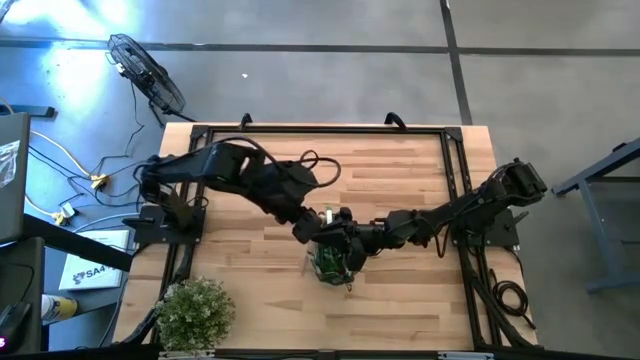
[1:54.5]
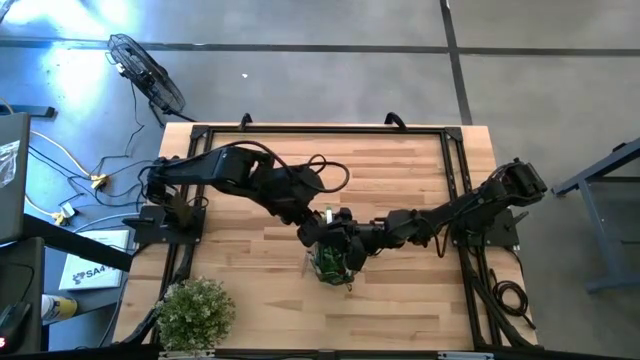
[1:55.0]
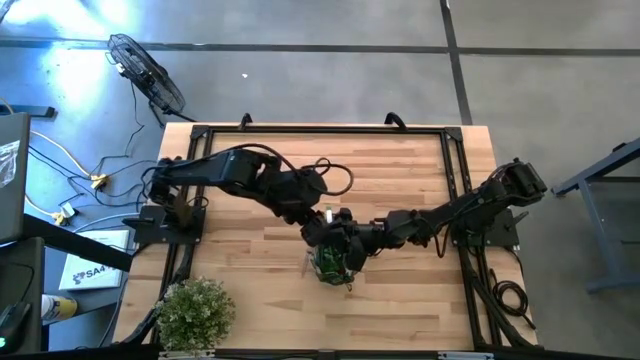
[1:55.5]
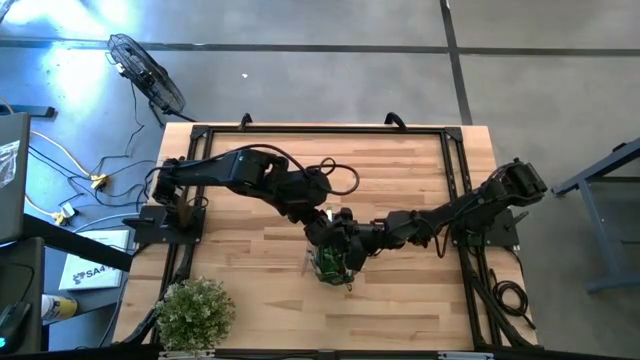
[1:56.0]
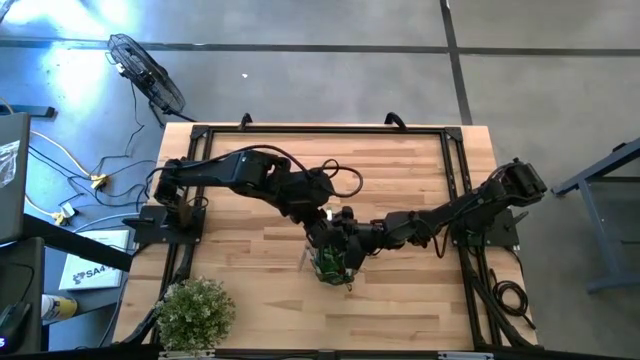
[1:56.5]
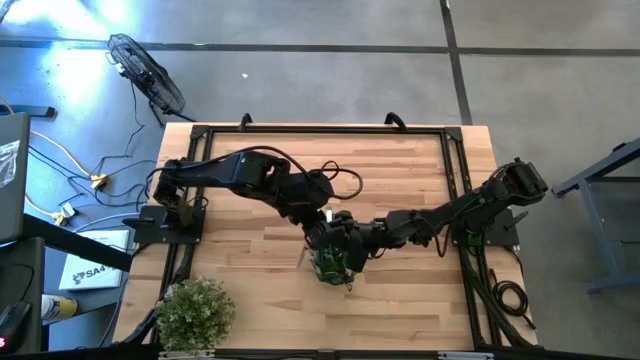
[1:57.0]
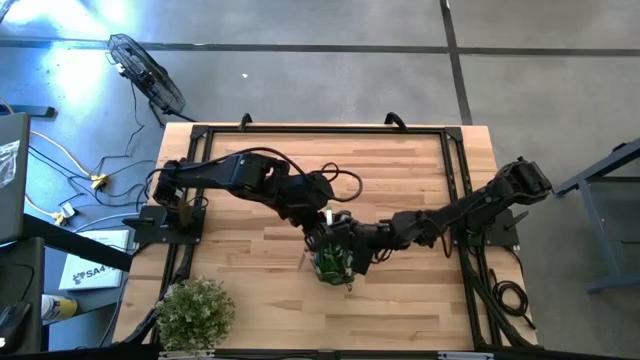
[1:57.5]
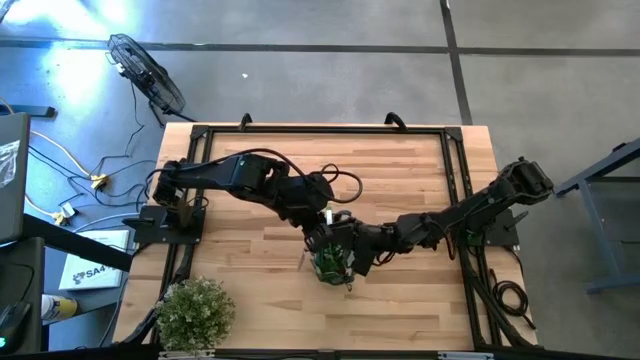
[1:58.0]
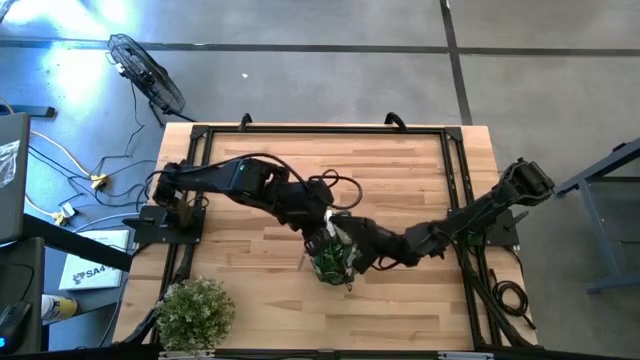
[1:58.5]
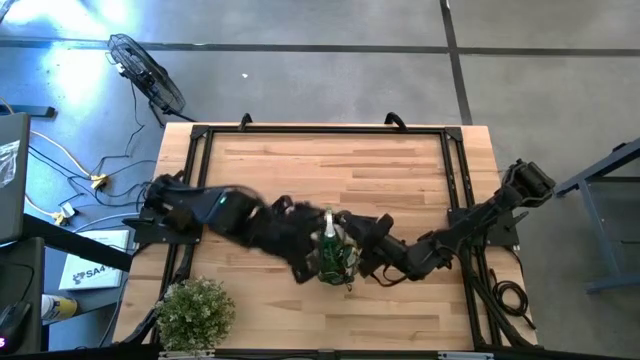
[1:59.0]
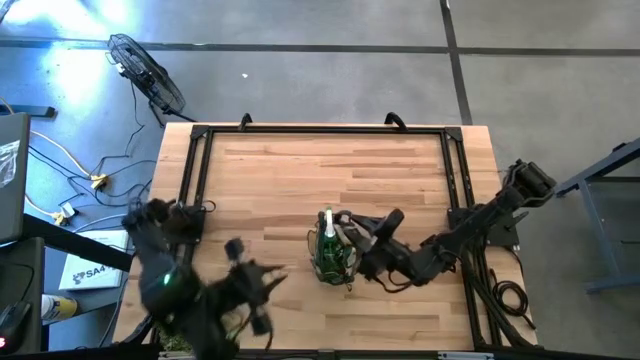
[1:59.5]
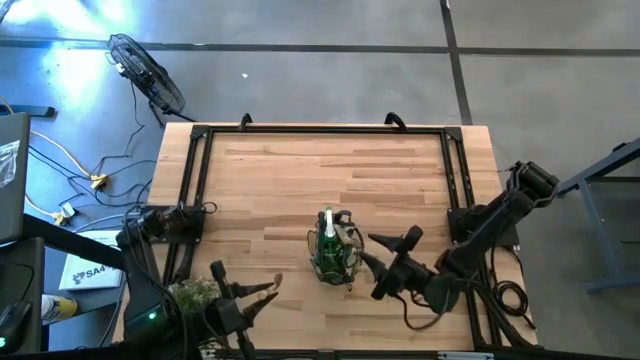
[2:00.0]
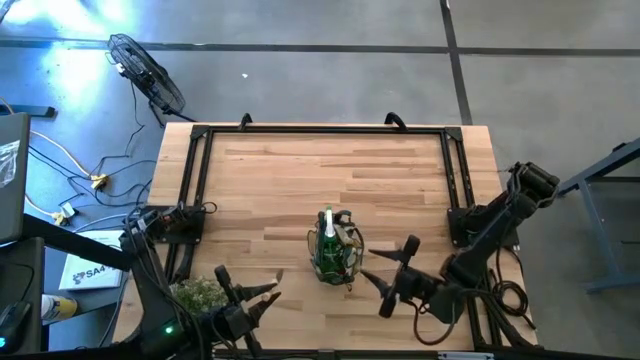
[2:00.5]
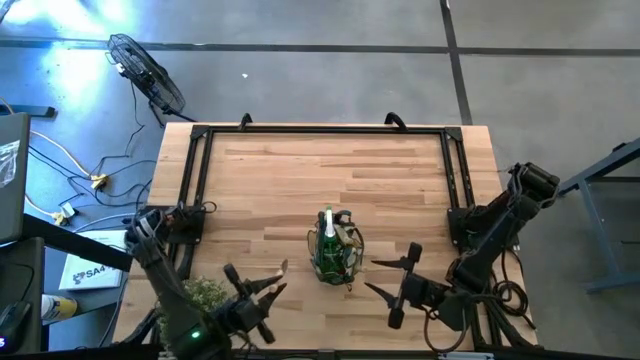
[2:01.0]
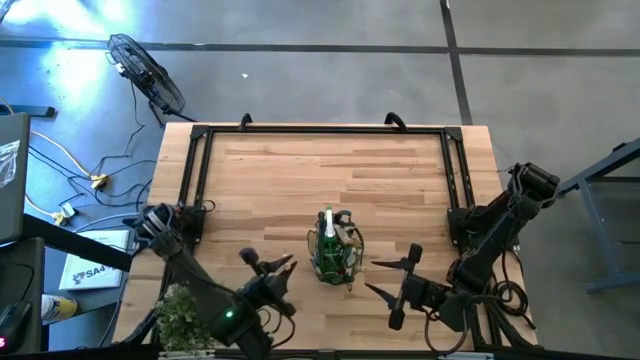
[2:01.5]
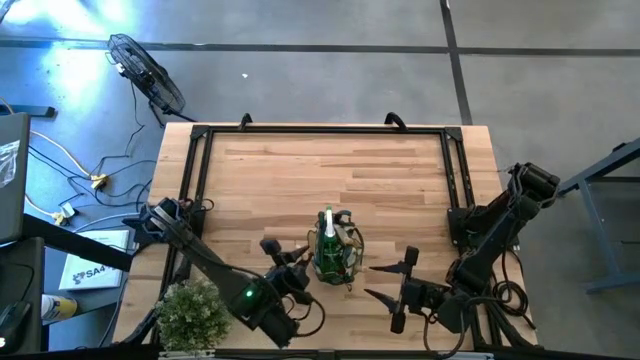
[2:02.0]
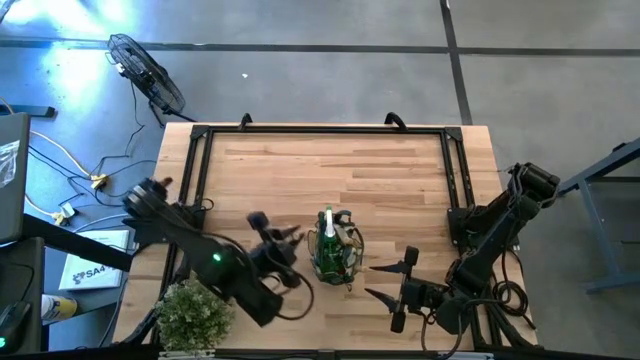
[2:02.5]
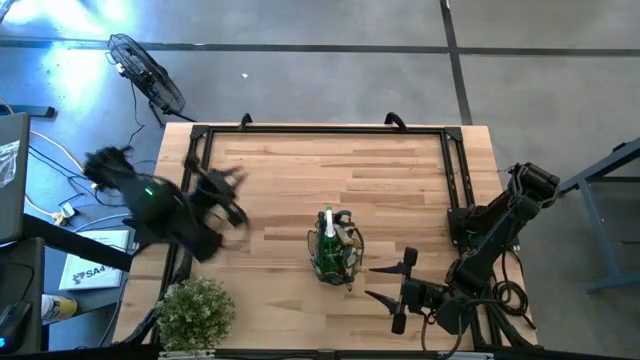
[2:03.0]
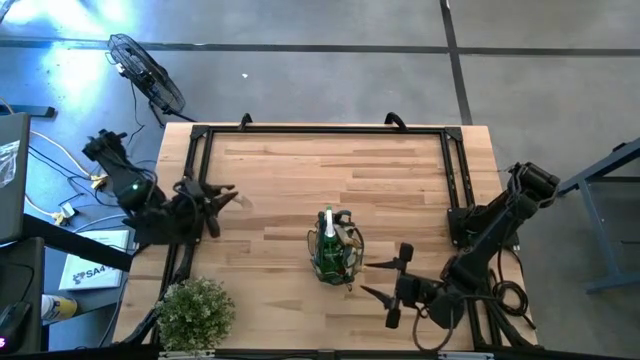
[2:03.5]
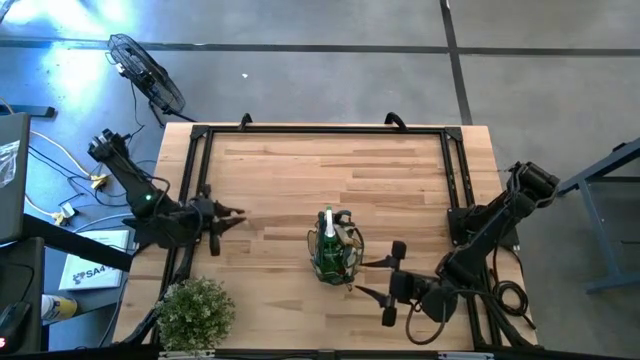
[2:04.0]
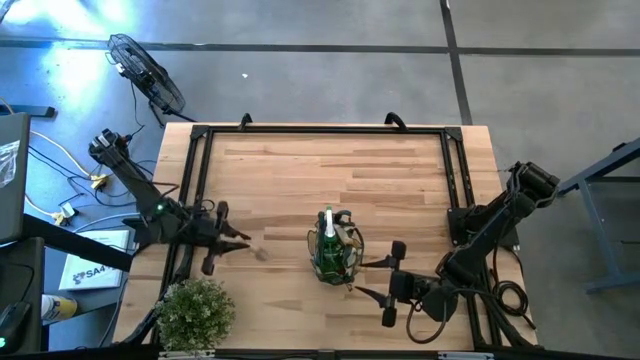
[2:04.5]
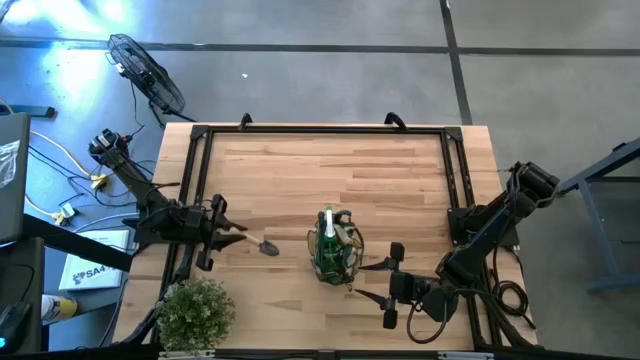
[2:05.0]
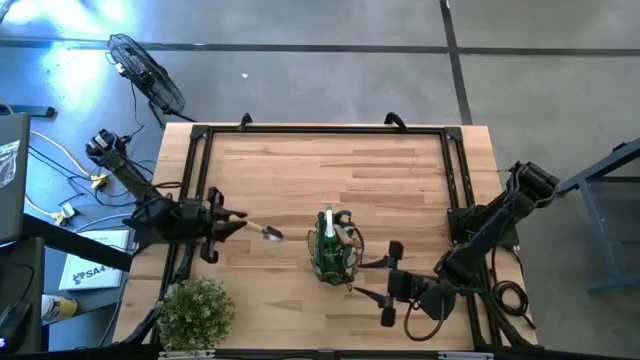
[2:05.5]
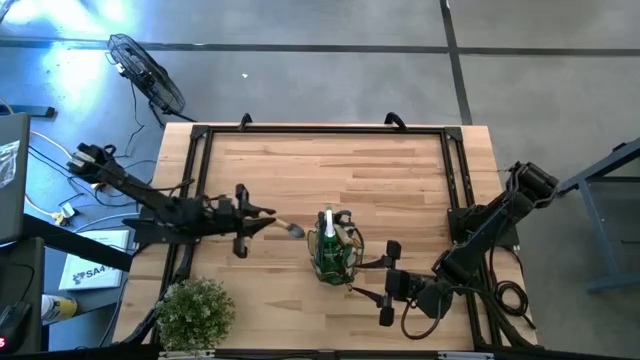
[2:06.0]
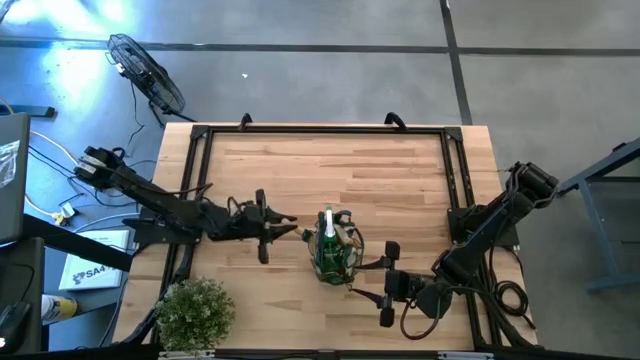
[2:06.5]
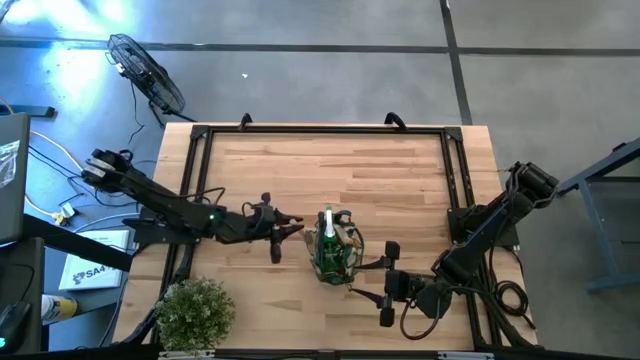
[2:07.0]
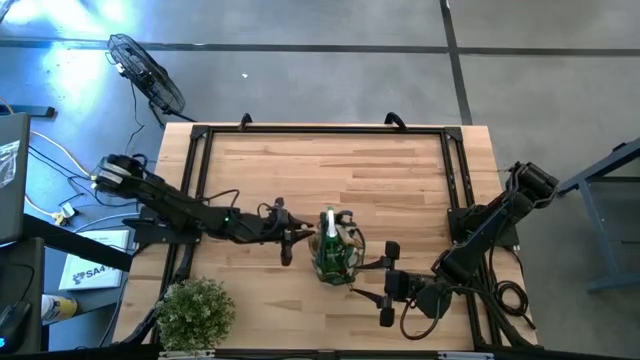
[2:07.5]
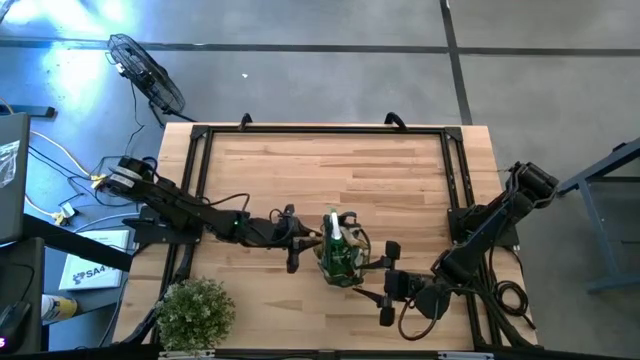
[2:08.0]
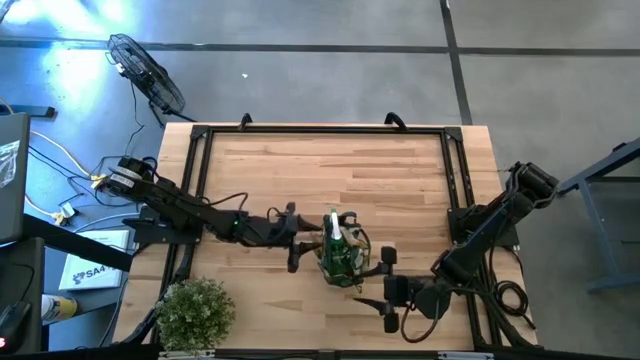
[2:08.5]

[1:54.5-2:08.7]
Task: Pick & Place Garden tools in Gardening bag
Put the trowel into the gardening bag

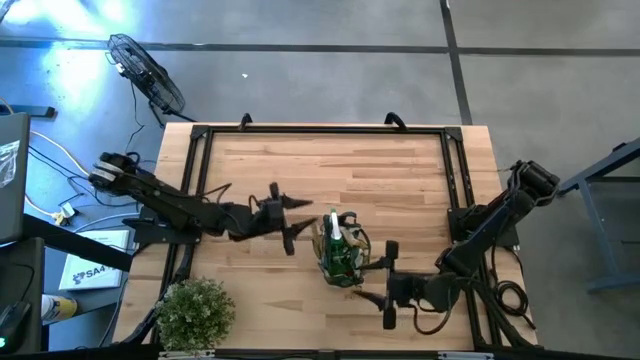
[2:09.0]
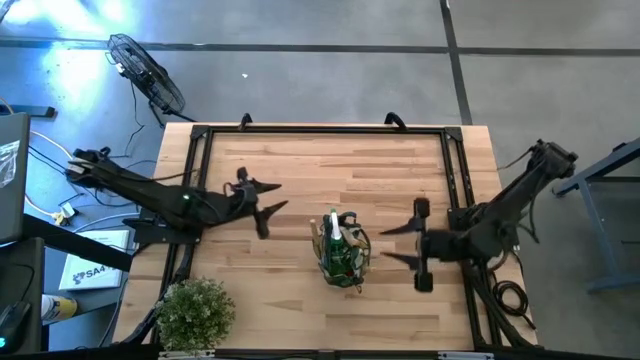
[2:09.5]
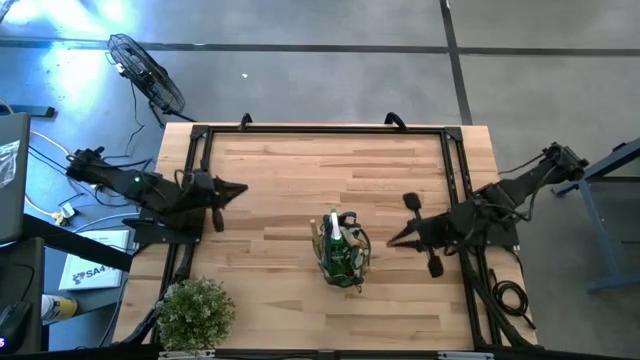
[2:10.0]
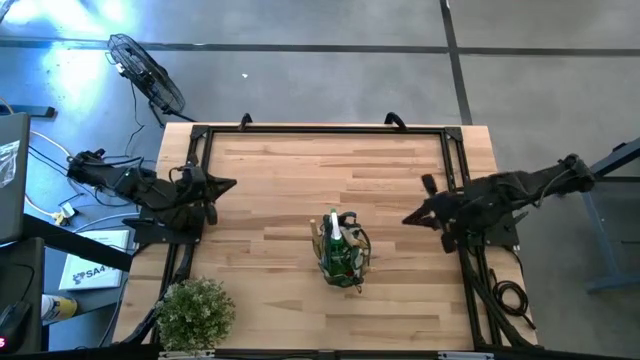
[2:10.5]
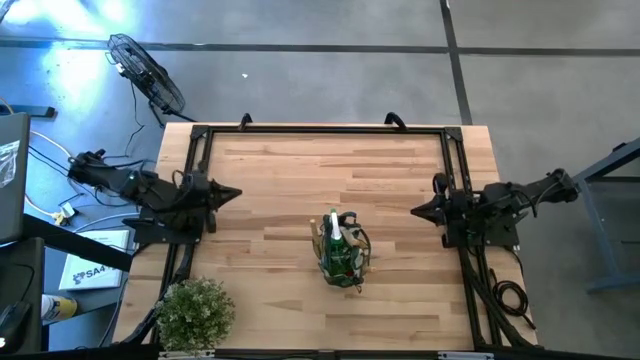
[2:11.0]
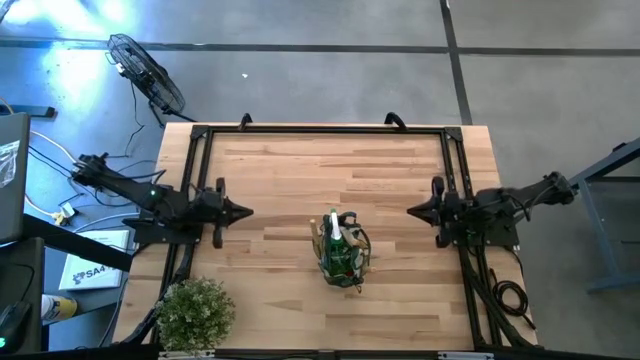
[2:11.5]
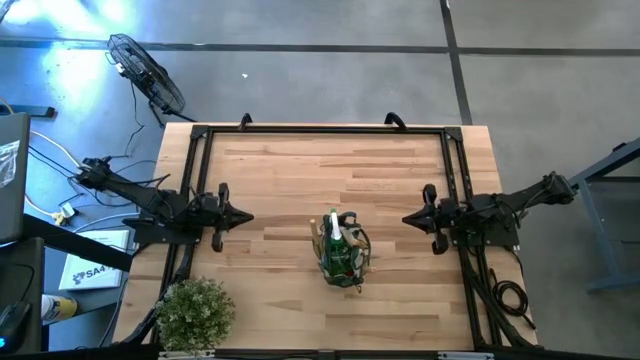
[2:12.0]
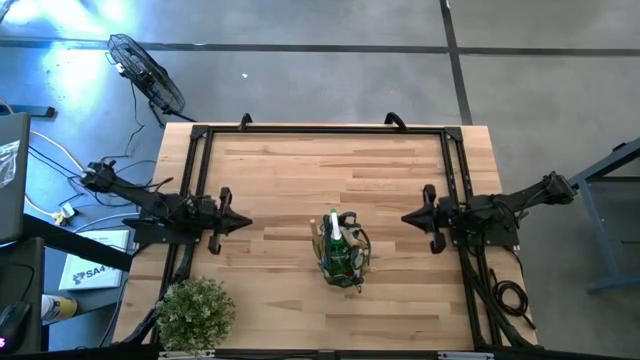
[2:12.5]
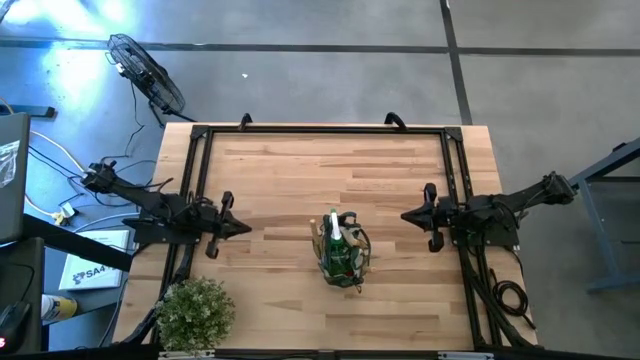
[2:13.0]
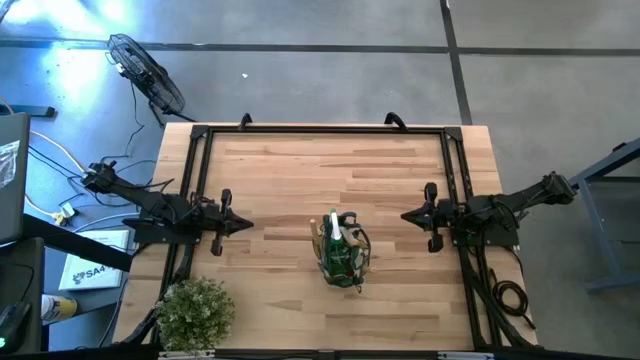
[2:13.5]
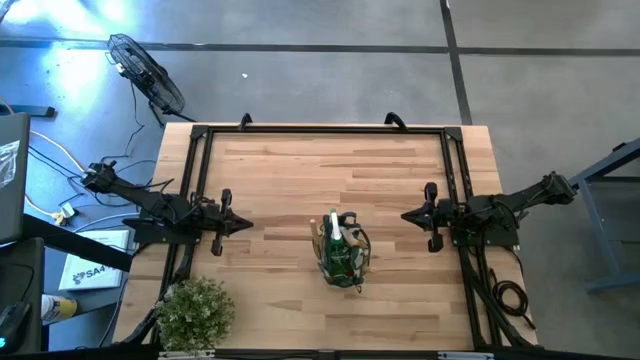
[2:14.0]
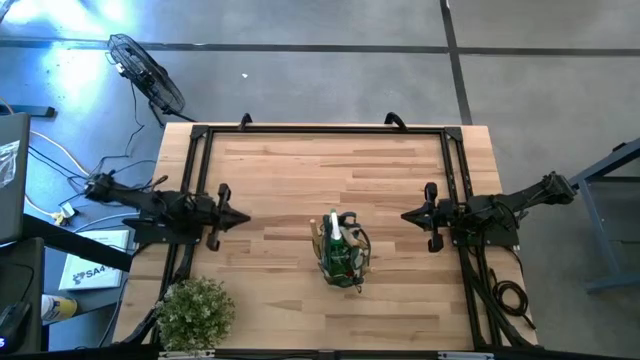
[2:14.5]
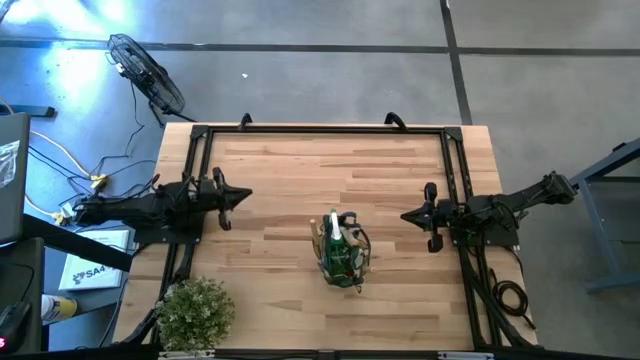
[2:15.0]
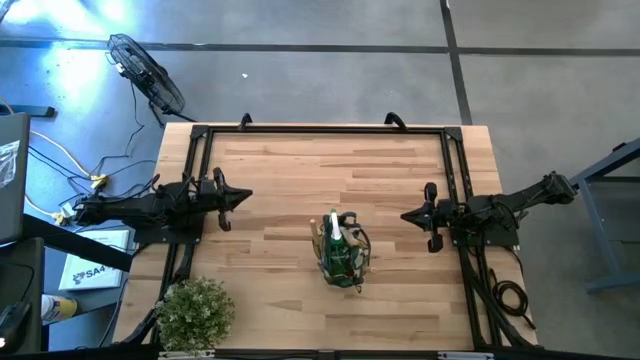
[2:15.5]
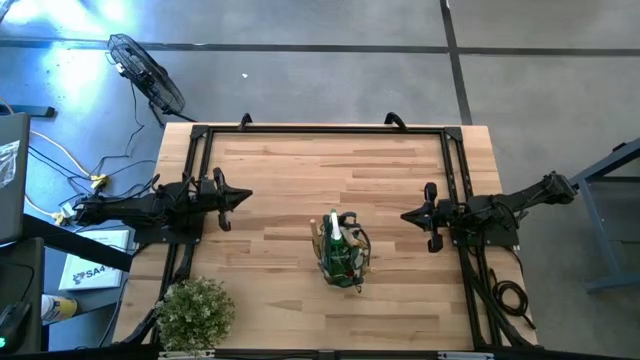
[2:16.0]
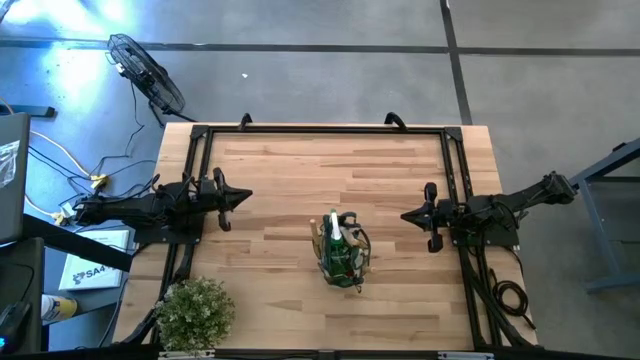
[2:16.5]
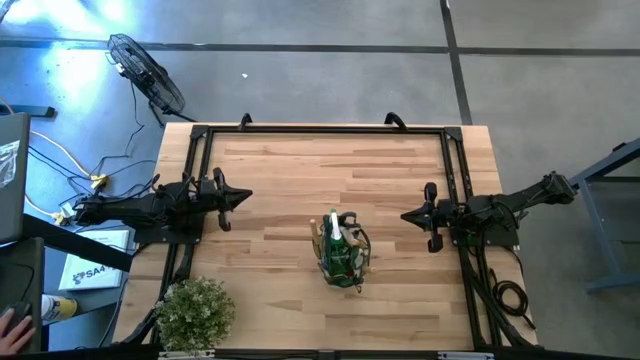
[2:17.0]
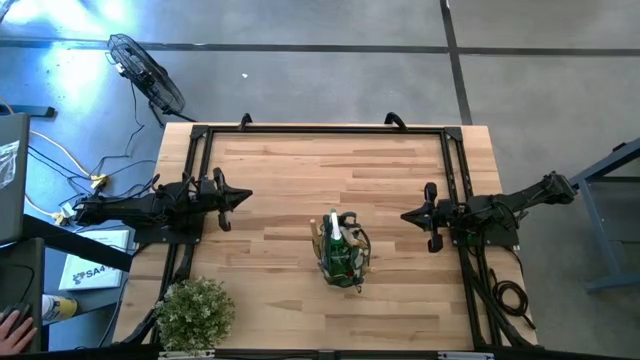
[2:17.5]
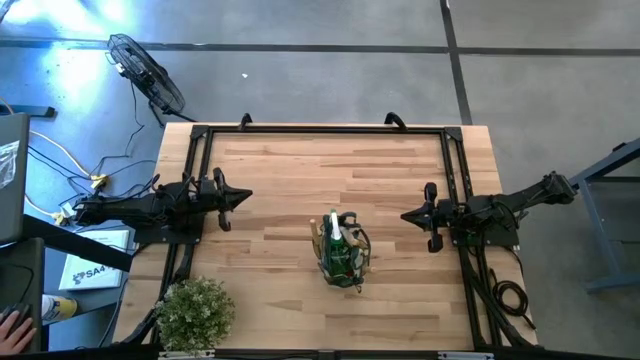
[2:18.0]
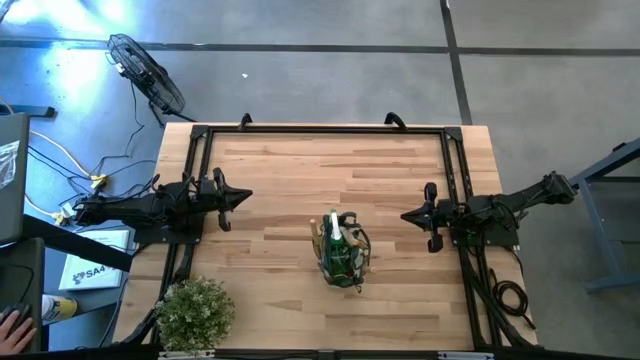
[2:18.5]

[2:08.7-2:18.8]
Return to Home Position
